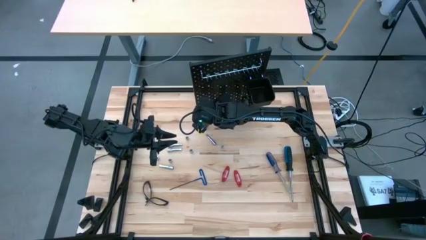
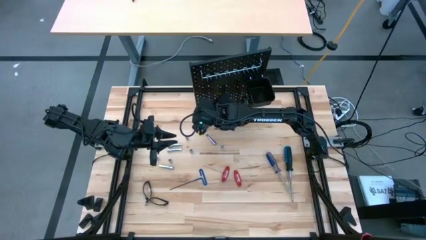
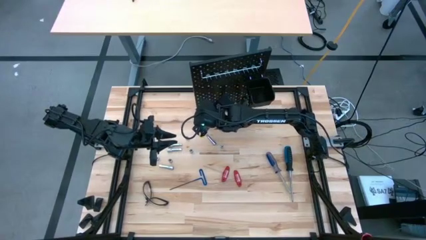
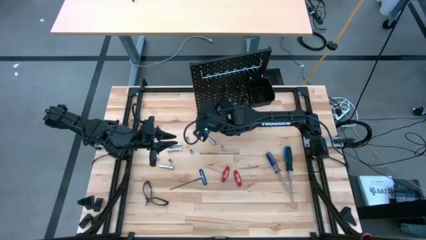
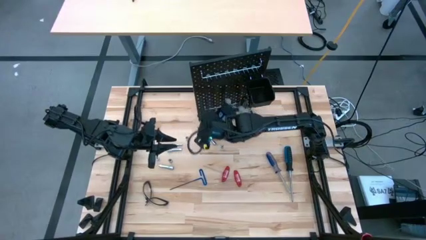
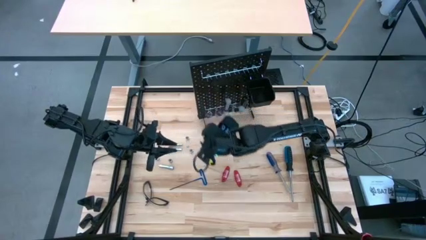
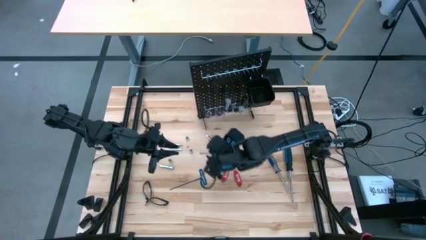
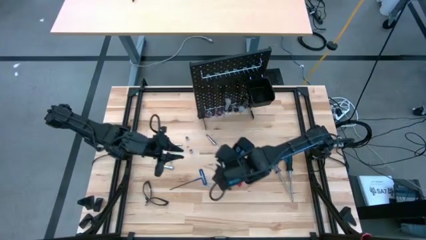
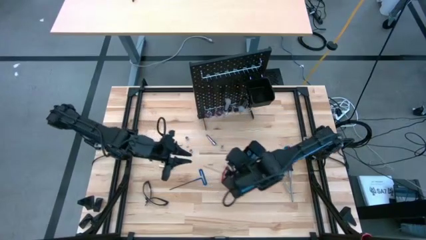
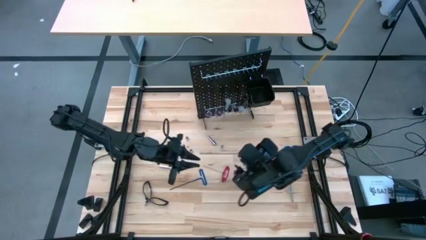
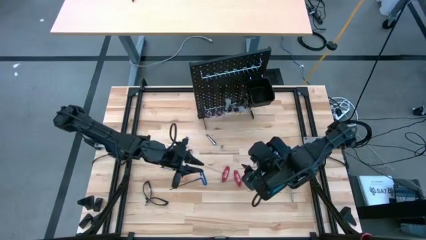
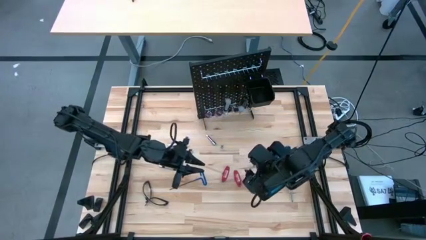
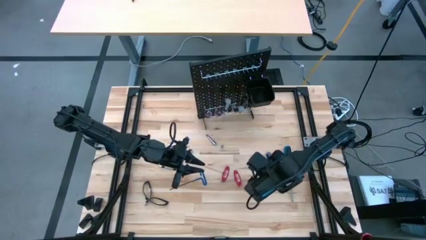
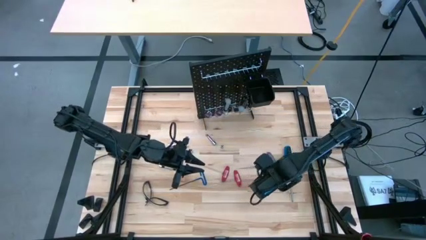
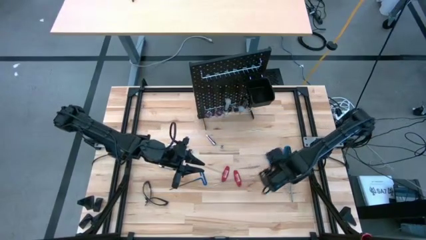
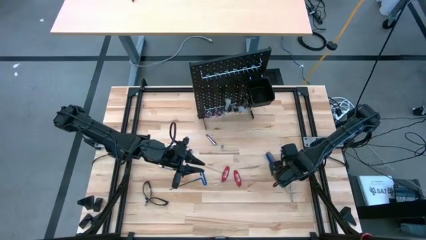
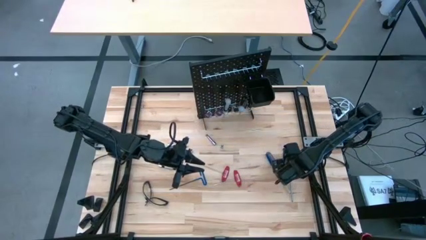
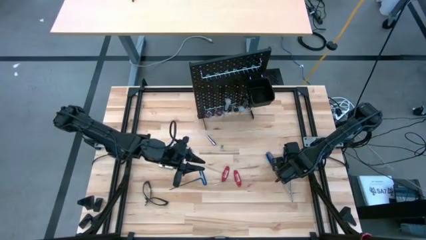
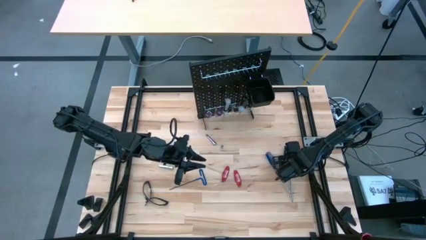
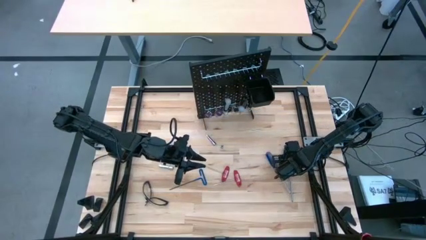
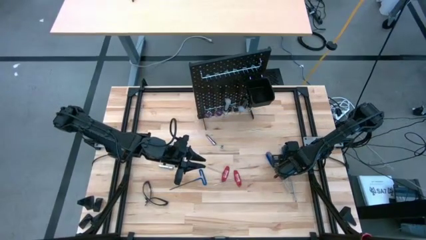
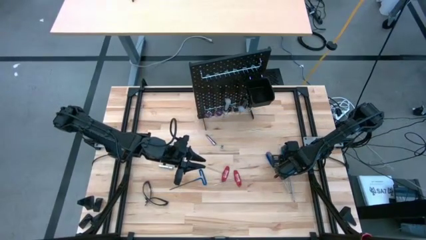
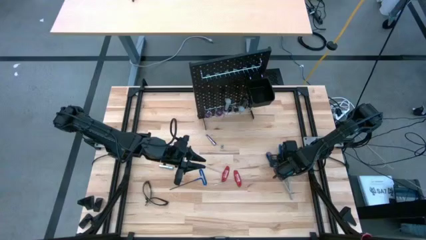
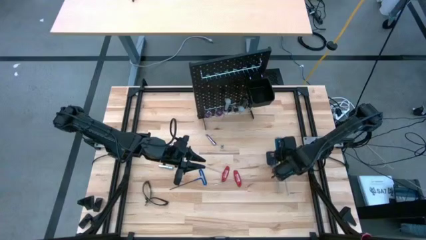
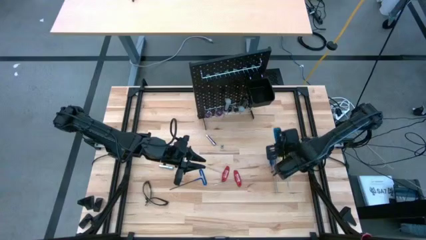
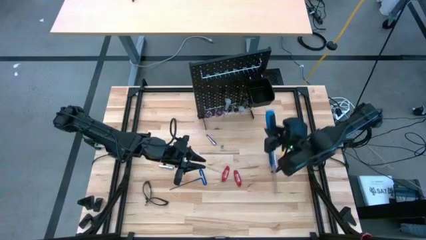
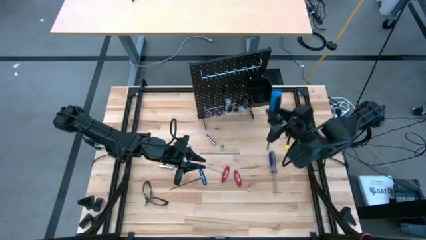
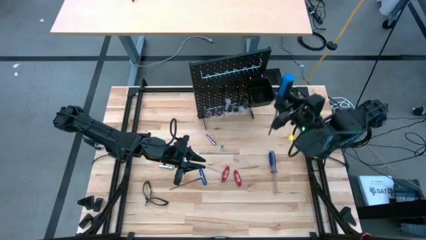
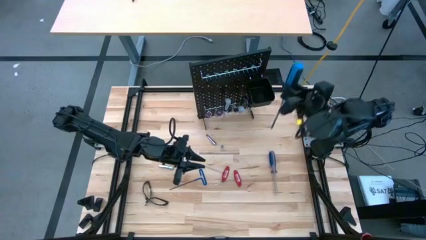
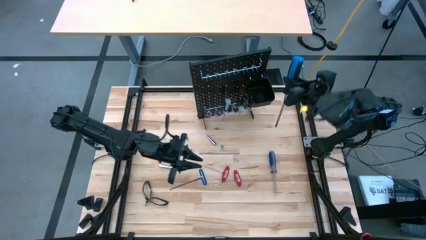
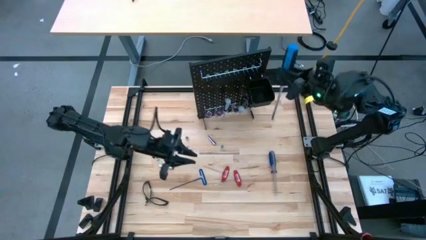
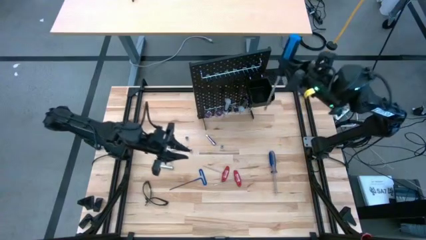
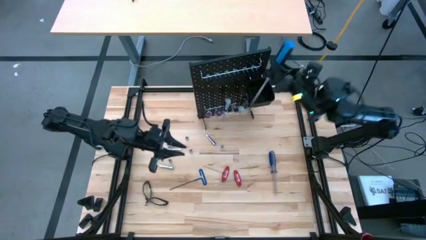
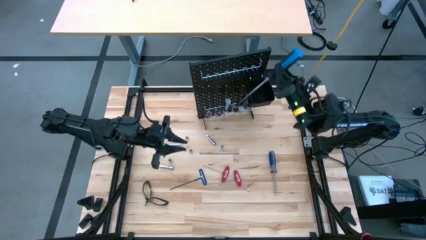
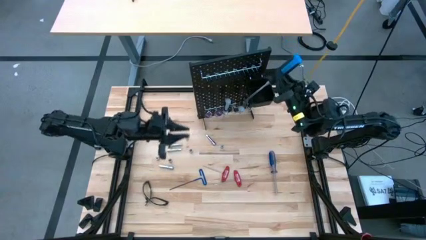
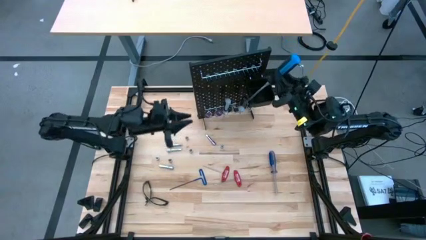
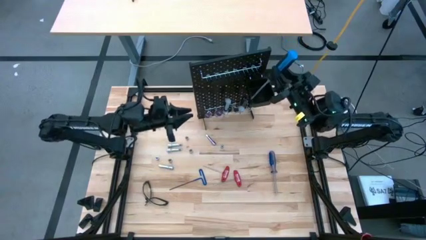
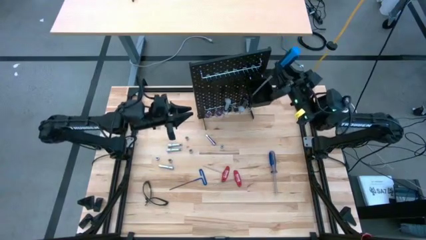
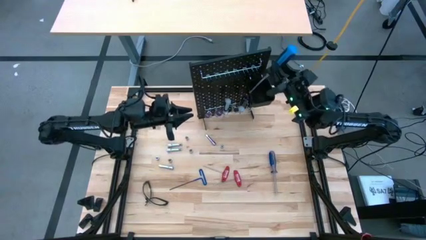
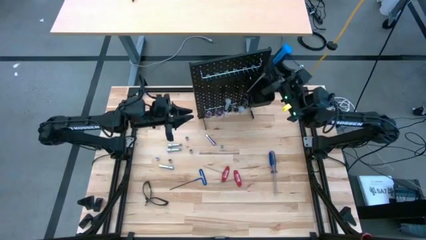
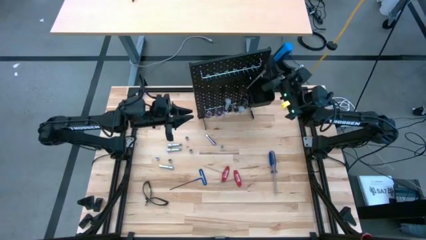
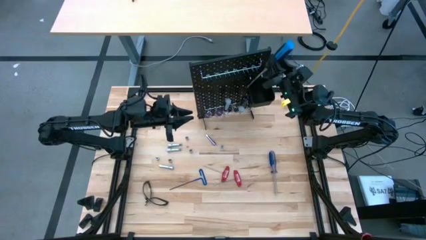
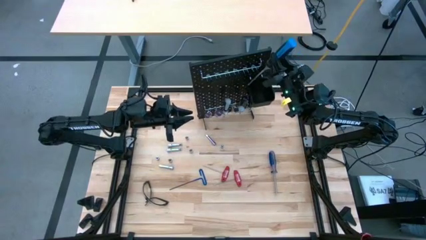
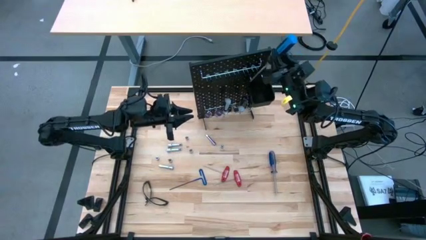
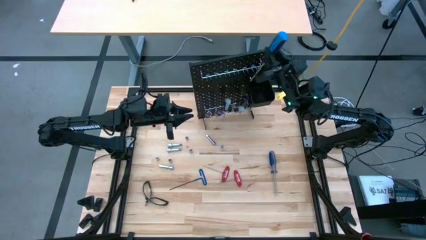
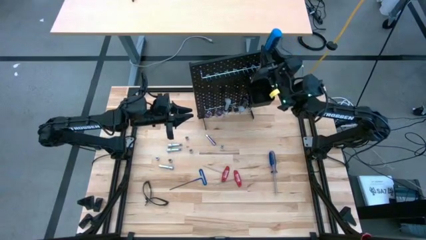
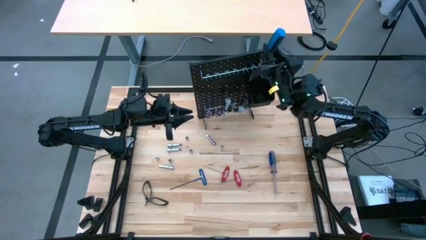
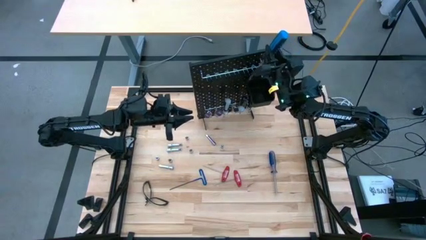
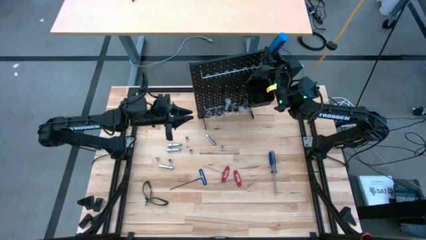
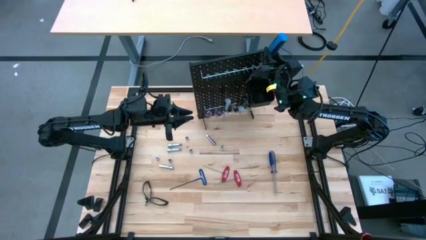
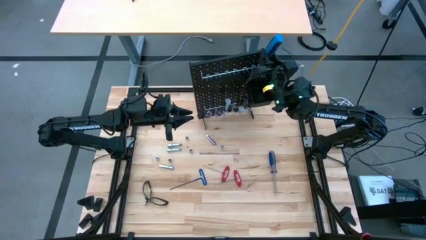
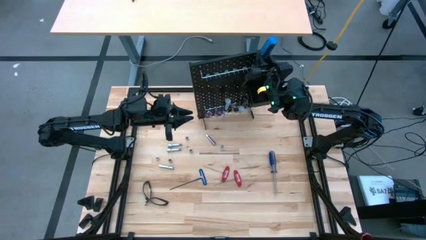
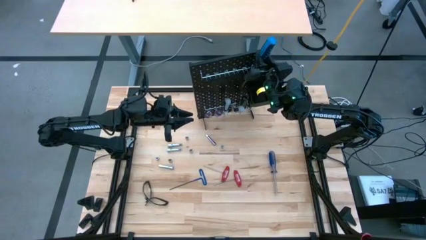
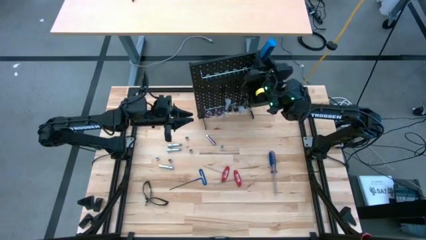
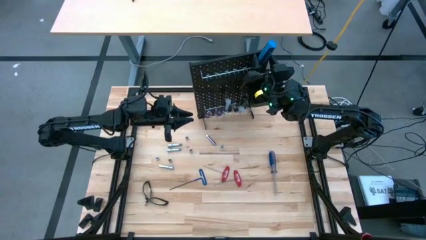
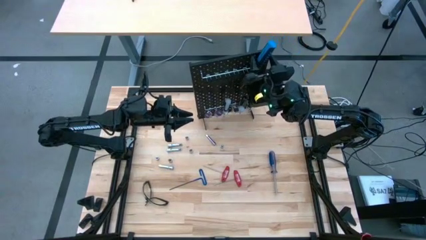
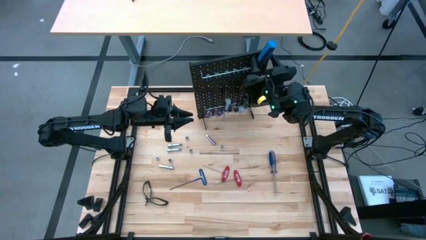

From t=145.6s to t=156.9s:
Task: Hang tools onto peg board
Hang the blue-black screwdriver on the pegboard

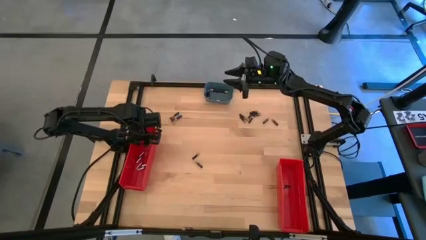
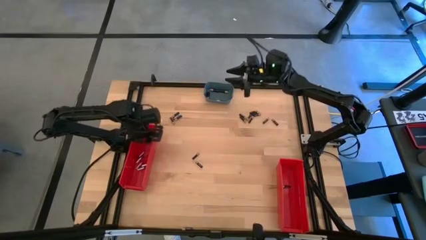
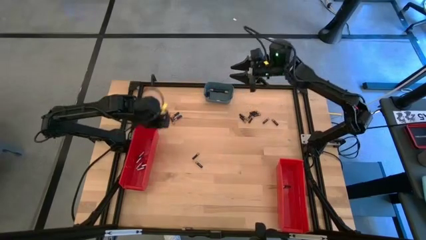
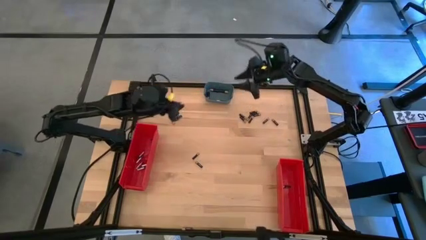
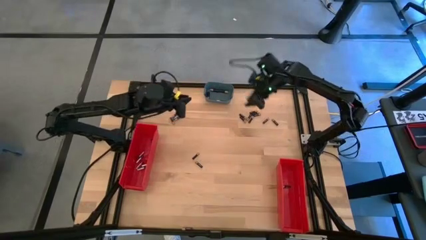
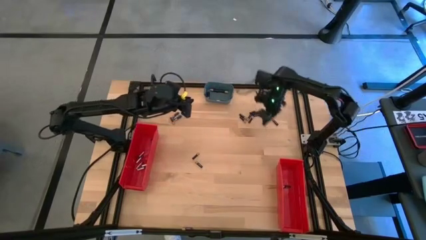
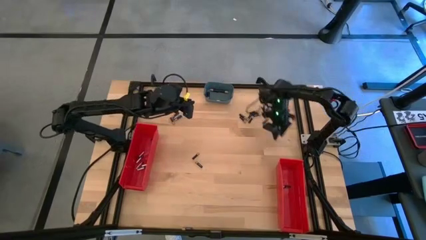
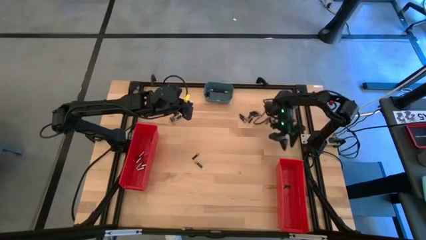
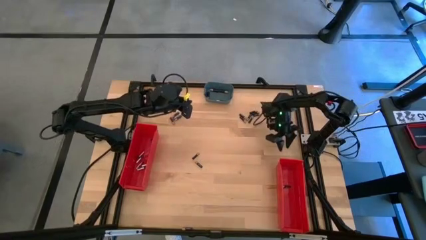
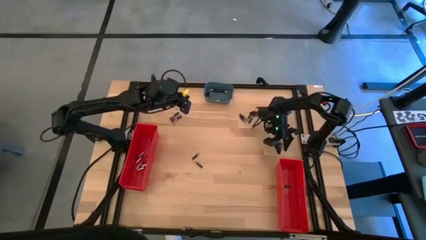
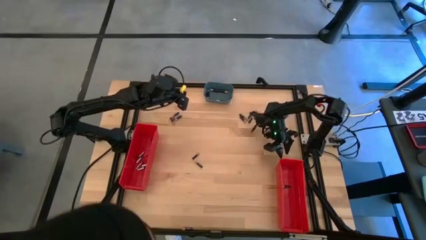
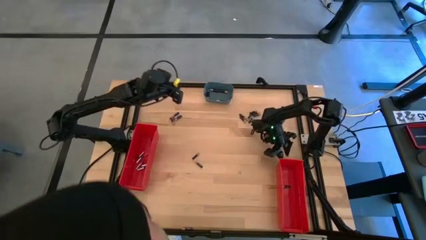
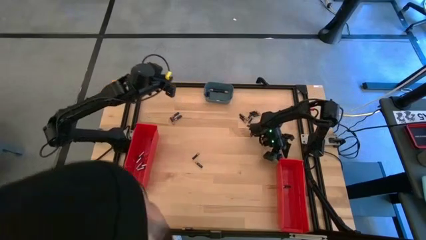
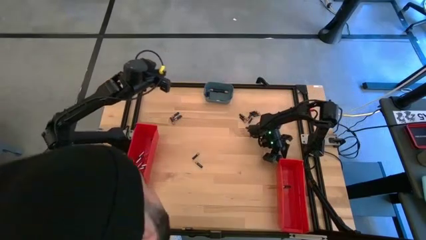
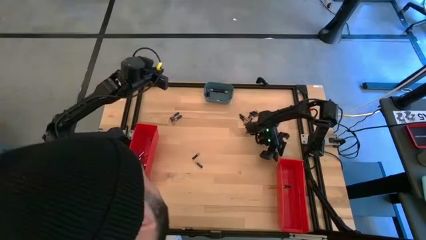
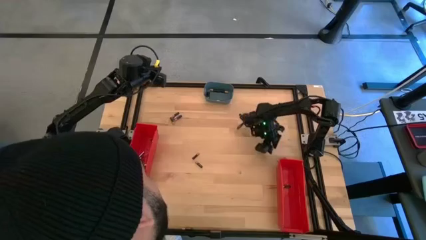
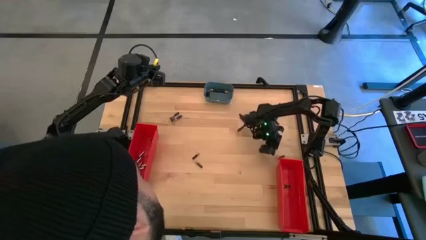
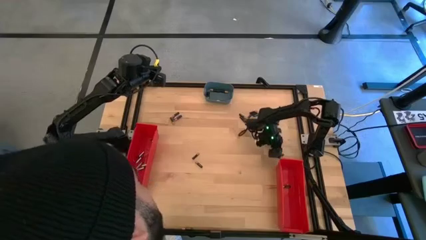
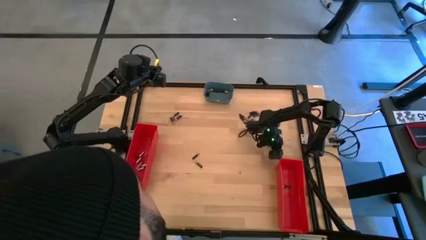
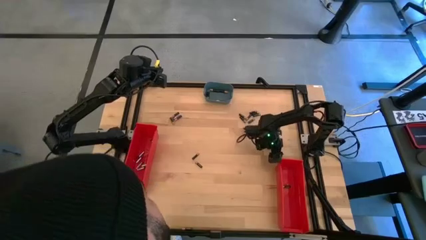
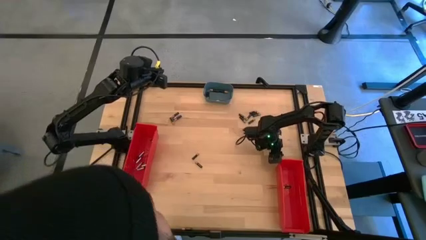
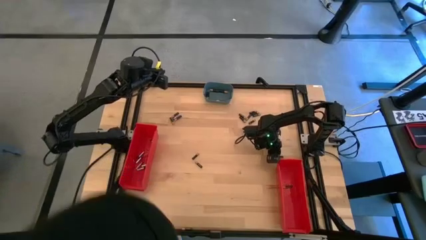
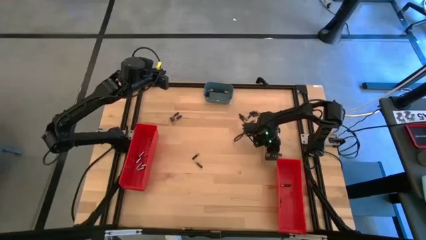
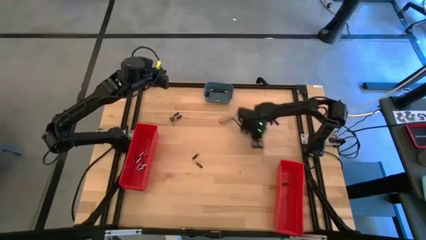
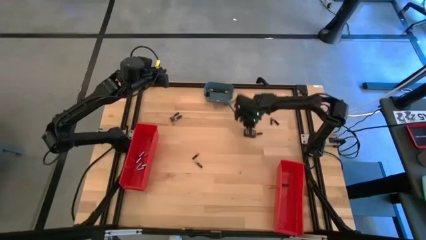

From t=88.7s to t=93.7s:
Task: Sort batteries
Put the small brown battery into the right red bin
